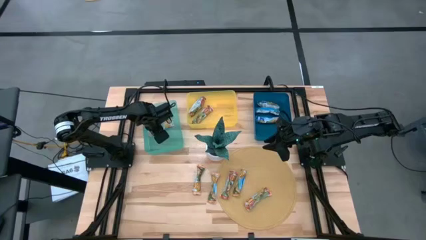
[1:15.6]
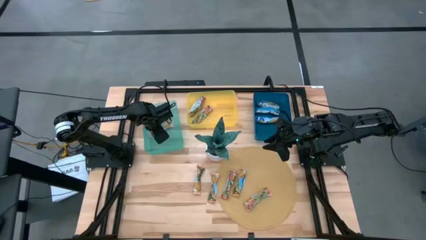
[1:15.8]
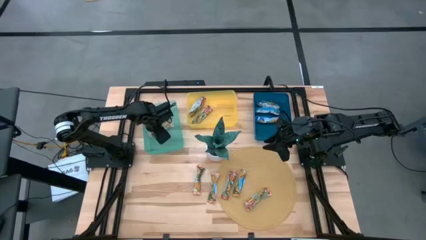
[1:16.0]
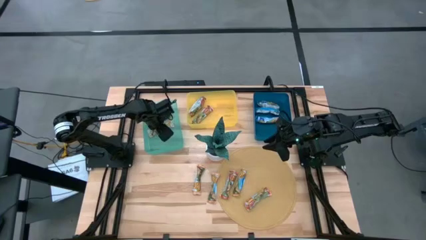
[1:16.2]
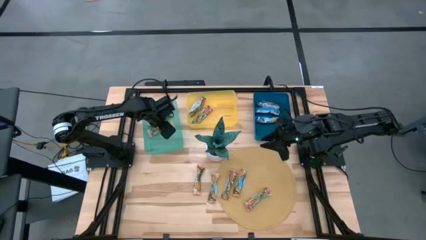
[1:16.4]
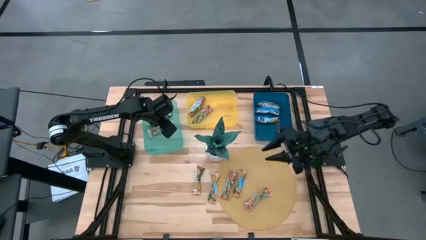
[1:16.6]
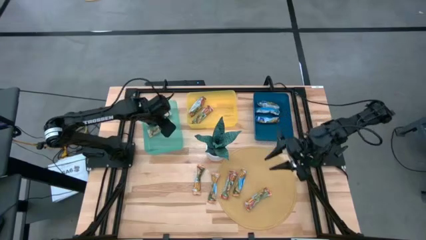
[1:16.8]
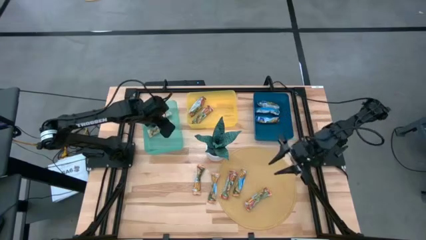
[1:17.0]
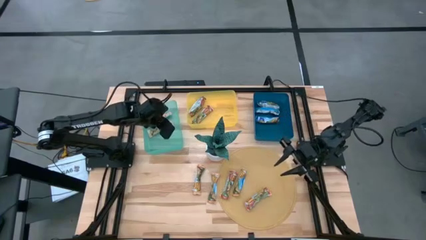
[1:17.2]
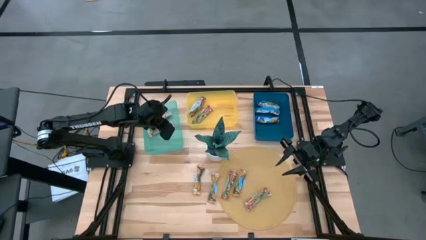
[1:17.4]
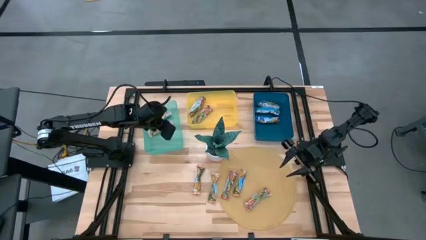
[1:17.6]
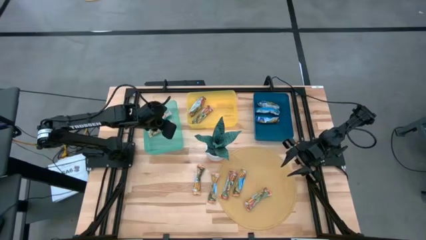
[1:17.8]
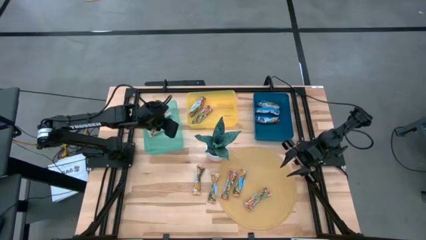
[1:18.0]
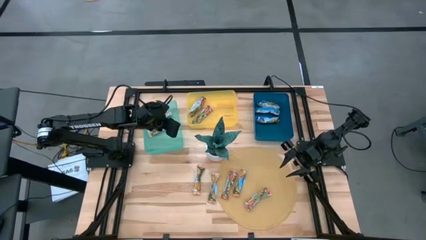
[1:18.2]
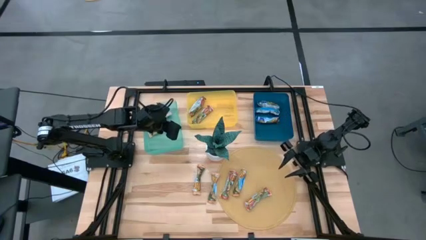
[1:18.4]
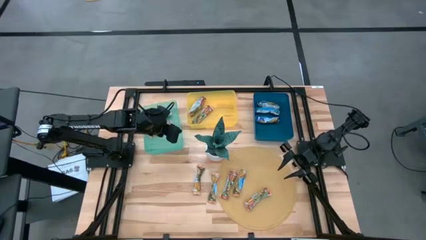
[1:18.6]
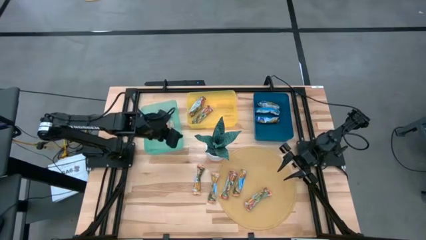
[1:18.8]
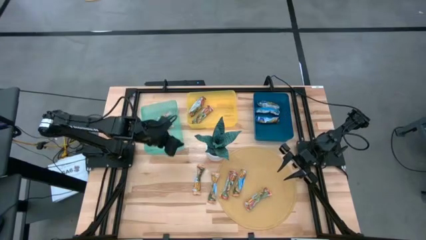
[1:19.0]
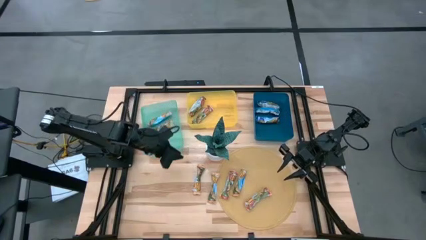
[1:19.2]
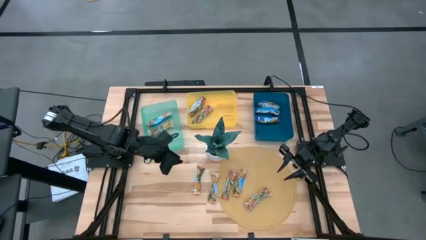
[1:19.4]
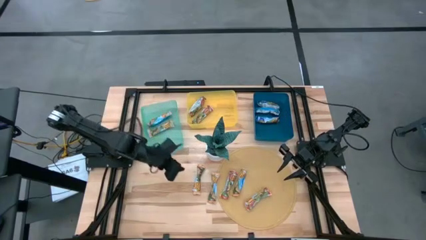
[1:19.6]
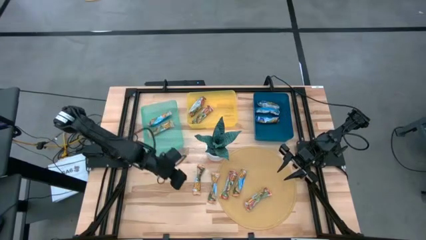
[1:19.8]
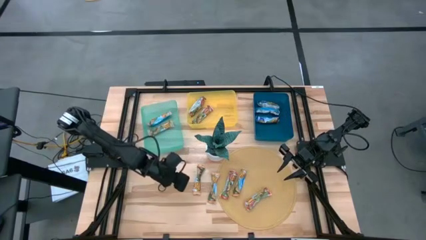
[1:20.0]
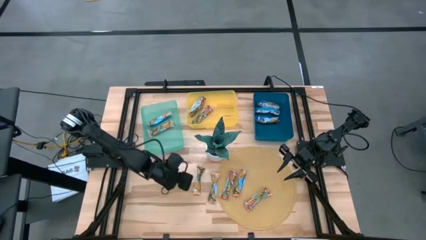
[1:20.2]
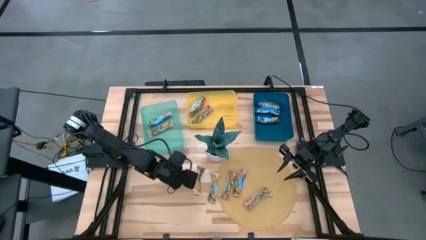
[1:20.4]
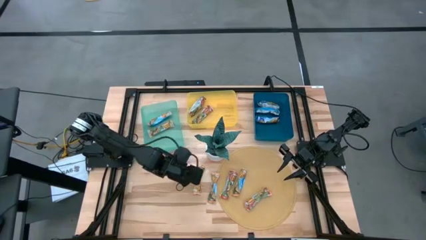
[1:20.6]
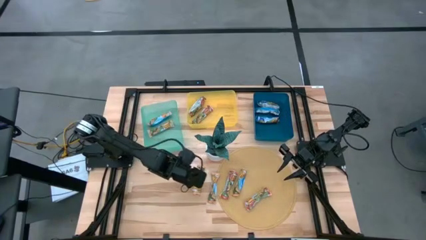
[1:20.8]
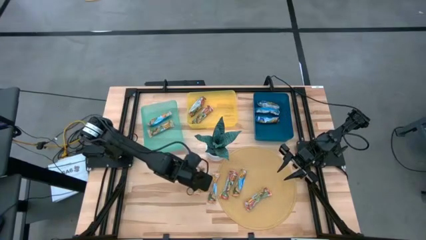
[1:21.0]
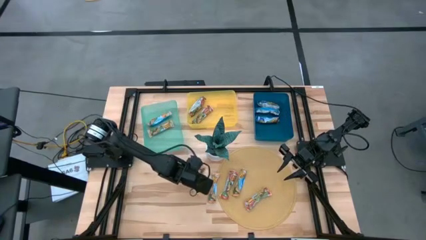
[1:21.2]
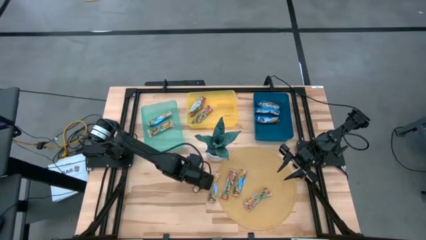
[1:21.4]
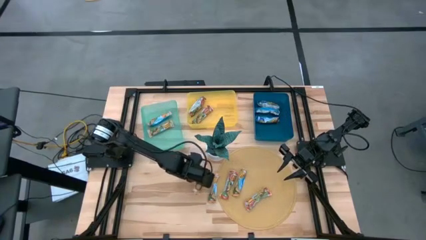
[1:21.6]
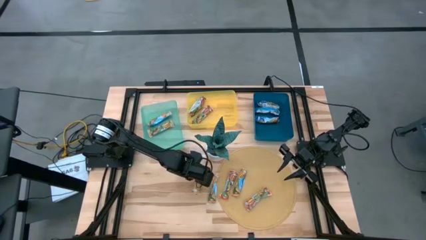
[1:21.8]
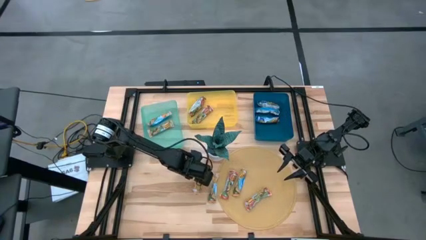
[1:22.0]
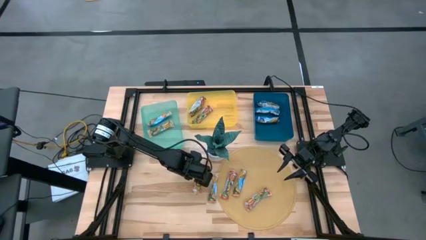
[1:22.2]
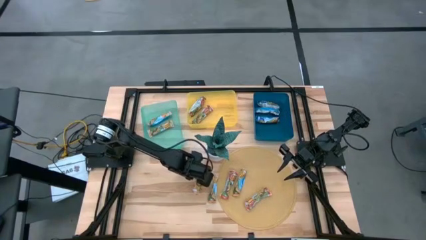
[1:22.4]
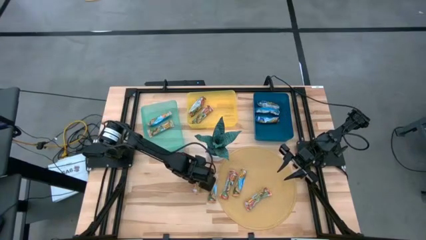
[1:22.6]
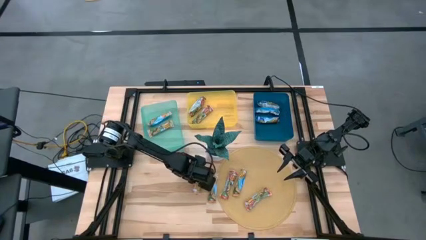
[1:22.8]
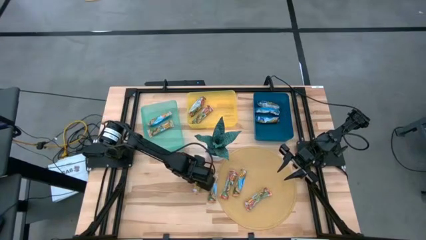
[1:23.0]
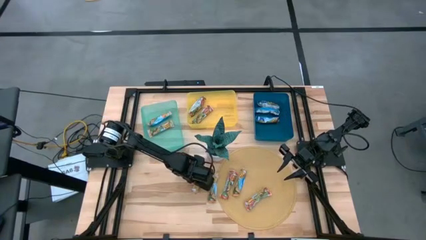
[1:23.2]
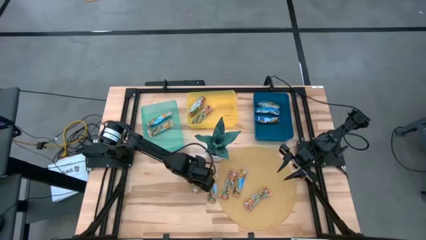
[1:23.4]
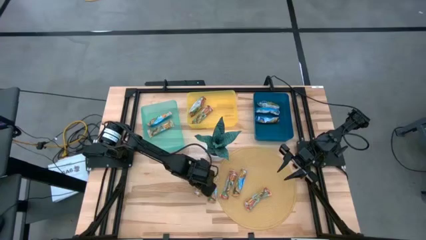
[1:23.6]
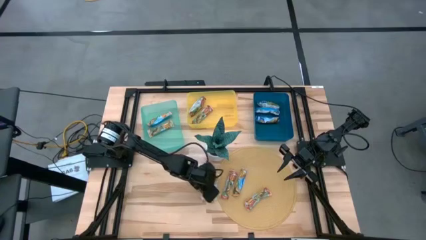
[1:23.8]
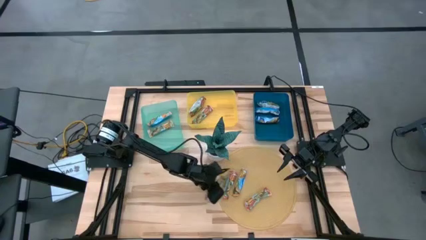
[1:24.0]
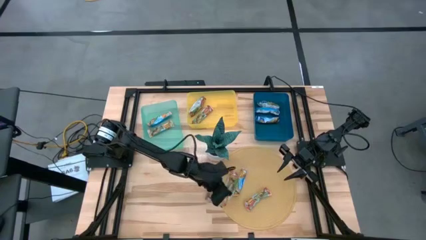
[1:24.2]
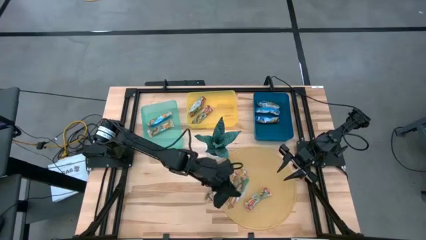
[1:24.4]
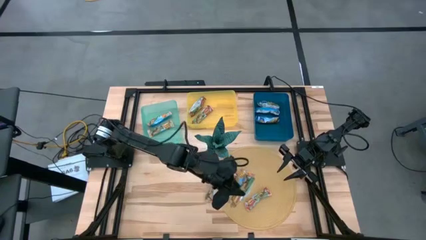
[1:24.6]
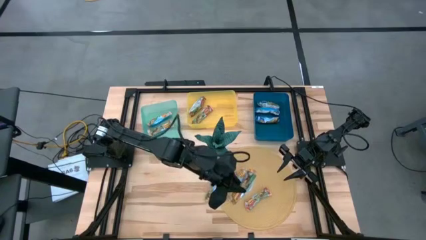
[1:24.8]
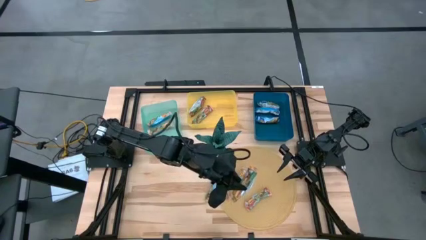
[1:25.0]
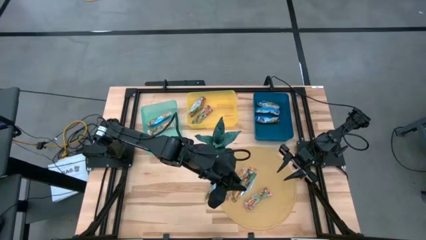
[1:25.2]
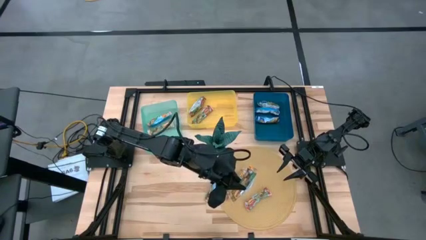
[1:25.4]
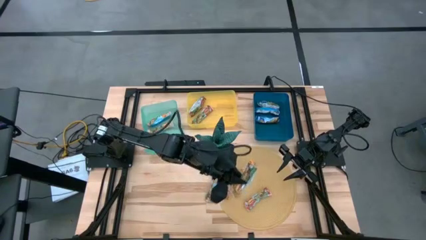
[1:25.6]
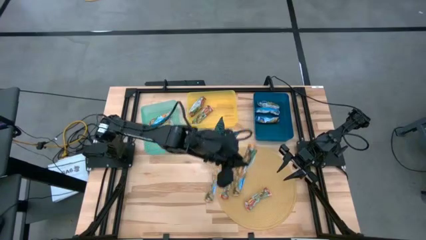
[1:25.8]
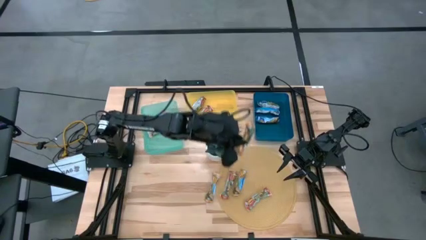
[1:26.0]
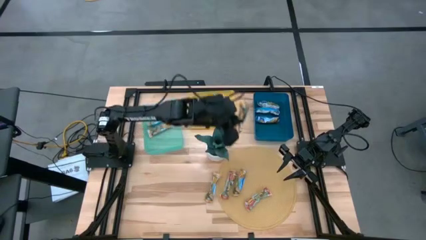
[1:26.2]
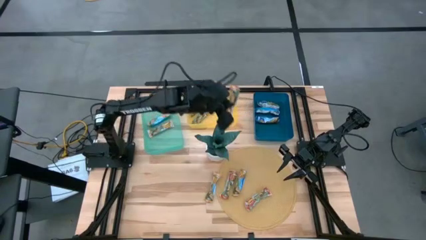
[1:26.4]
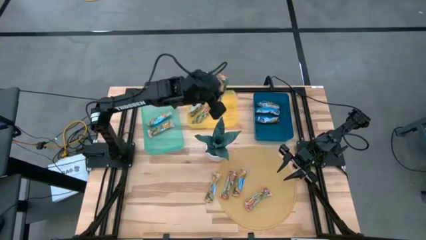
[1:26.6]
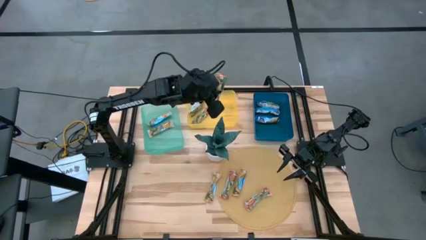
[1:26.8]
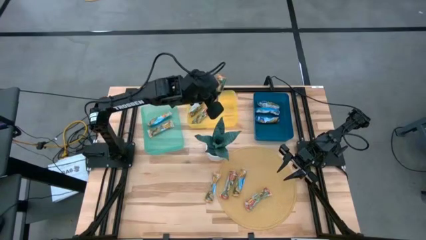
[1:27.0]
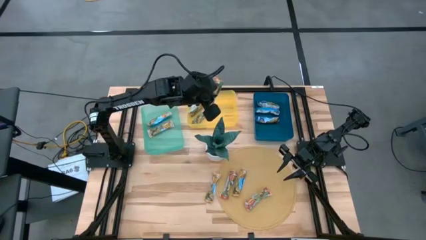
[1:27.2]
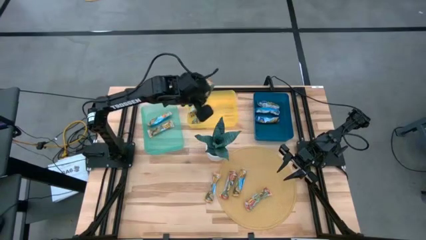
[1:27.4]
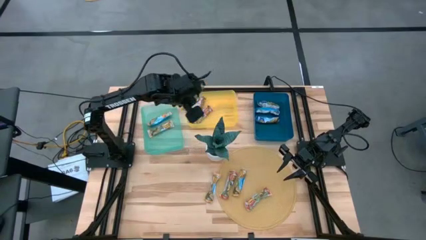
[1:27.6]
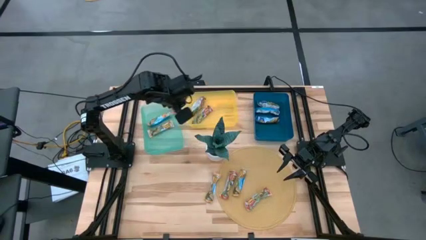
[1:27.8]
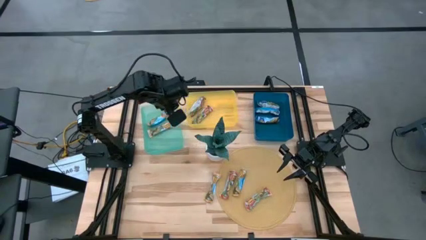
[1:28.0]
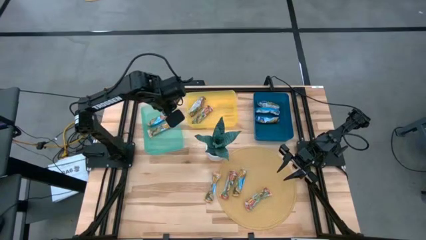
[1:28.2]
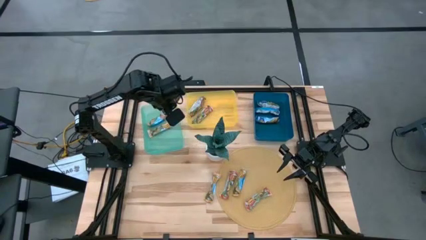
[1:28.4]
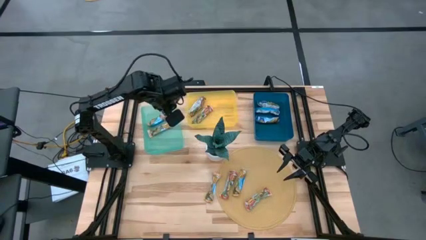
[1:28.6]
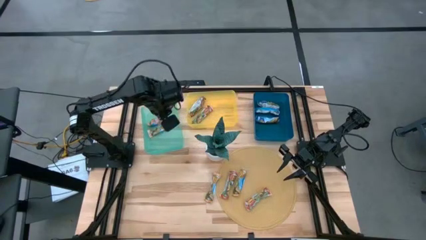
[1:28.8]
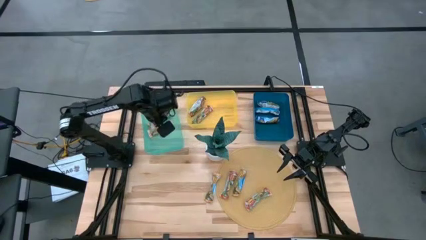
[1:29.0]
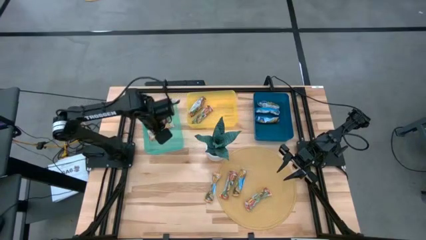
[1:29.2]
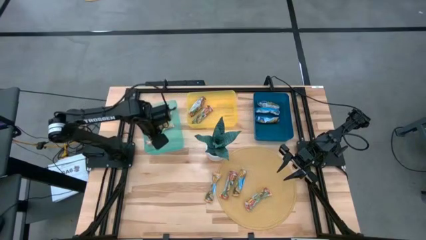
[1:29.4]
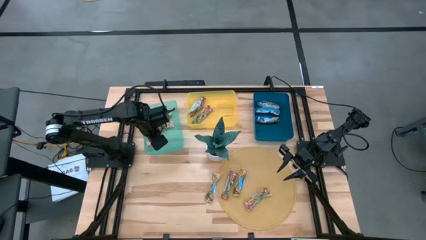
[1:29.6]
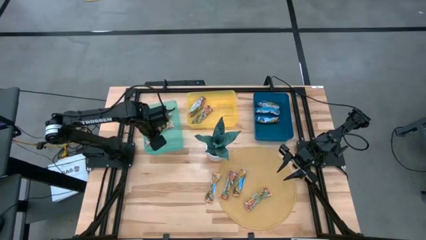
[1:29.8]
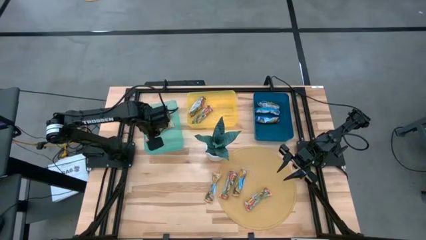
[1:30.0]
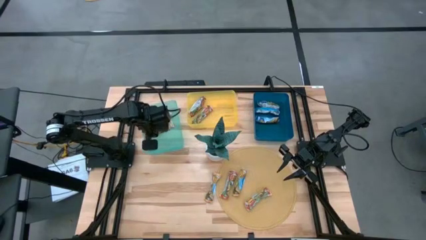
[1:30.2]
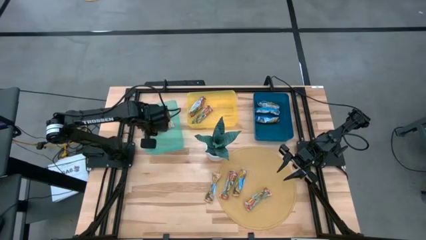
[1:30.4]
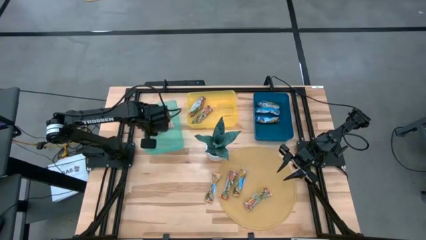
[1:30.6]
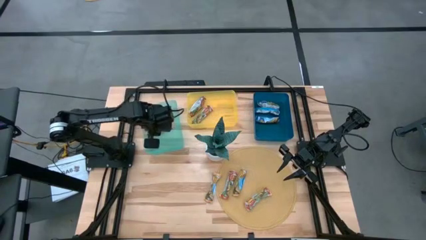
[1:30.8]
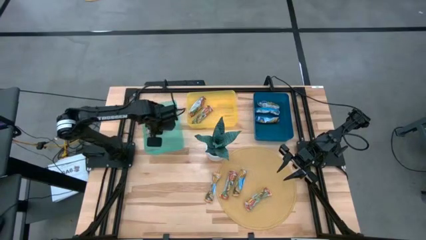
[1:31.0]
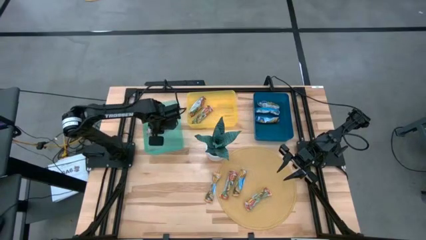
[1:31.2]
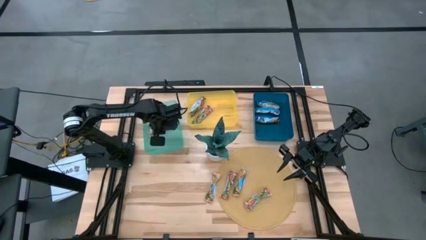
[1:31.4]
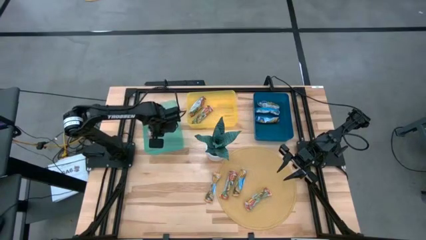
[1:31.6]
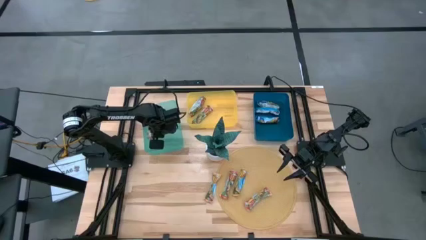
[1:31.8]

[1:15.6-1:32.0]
Task: Pick and place Granola Bars by type
Put the orange granola bar into the green bin
